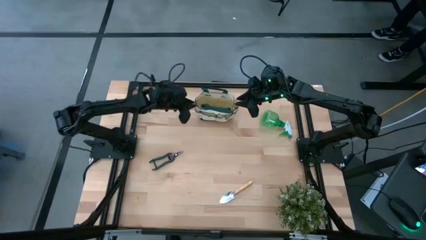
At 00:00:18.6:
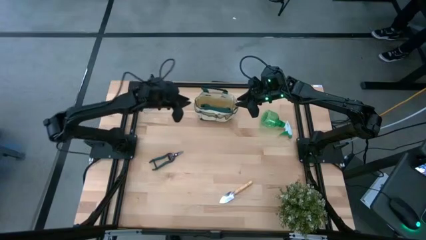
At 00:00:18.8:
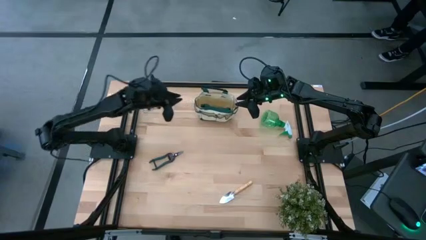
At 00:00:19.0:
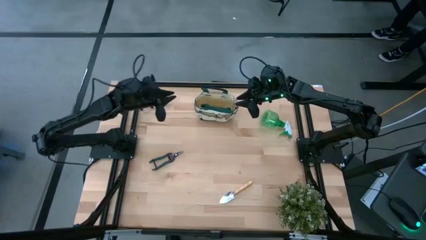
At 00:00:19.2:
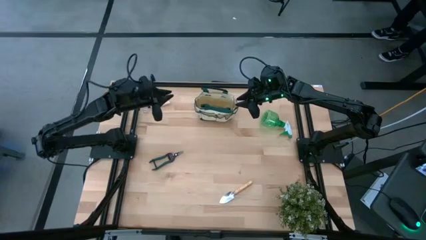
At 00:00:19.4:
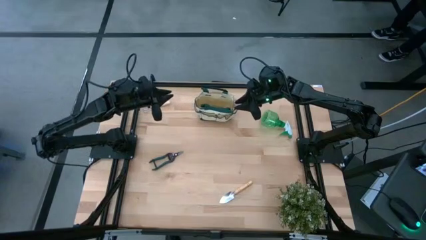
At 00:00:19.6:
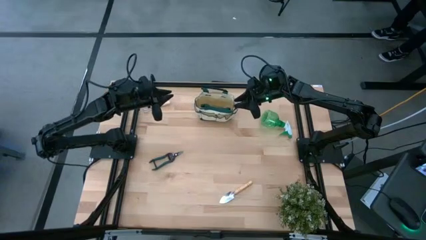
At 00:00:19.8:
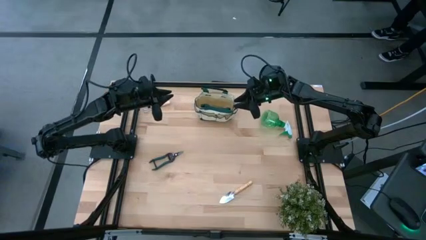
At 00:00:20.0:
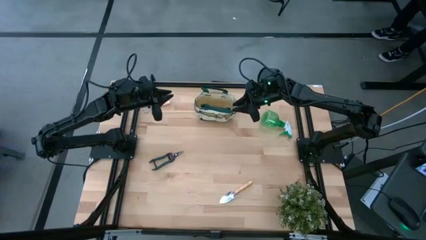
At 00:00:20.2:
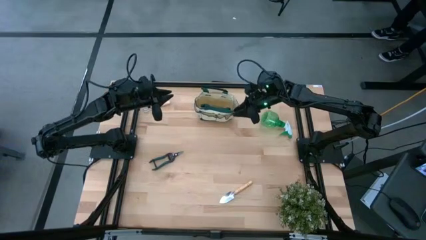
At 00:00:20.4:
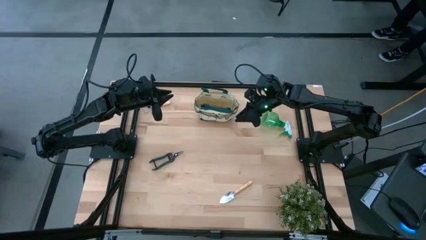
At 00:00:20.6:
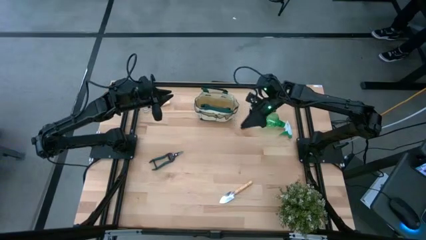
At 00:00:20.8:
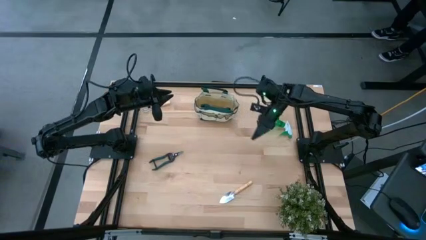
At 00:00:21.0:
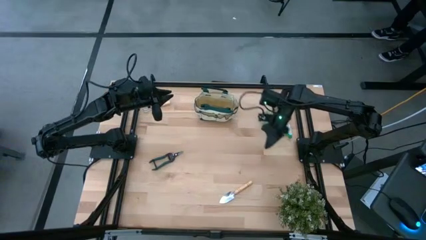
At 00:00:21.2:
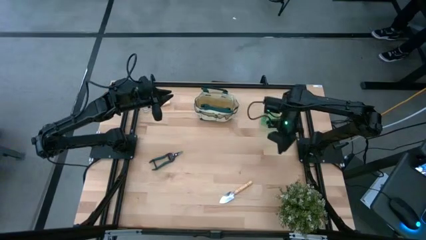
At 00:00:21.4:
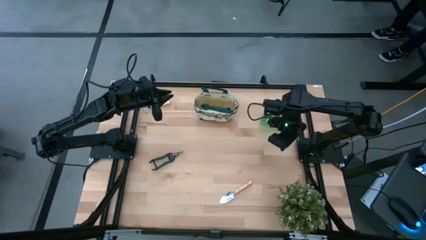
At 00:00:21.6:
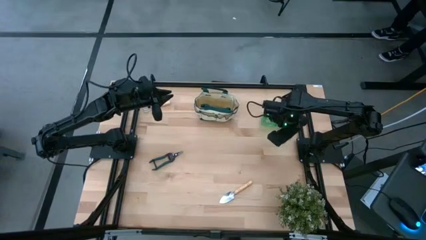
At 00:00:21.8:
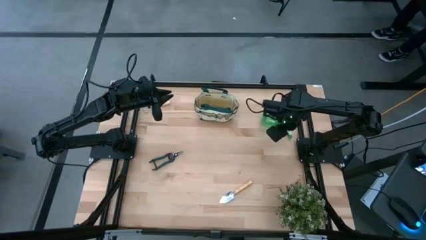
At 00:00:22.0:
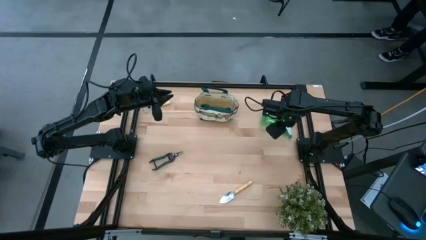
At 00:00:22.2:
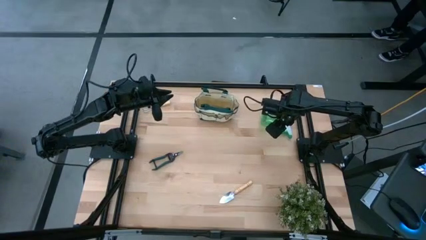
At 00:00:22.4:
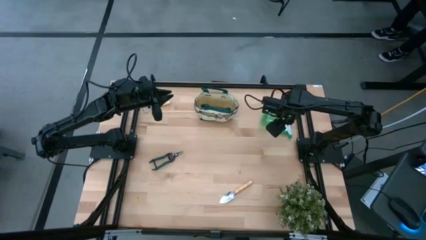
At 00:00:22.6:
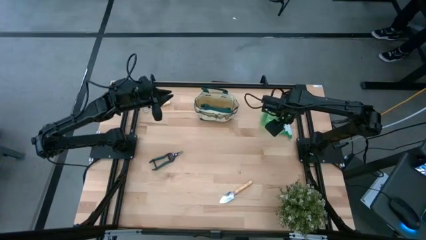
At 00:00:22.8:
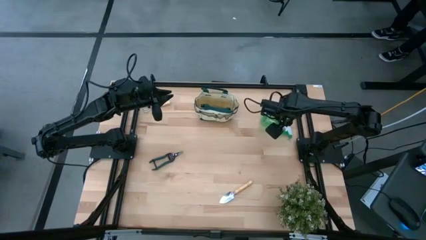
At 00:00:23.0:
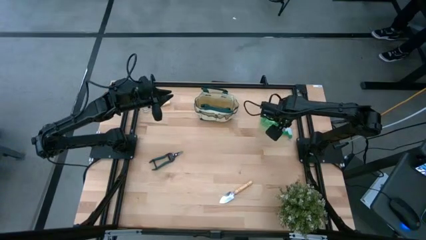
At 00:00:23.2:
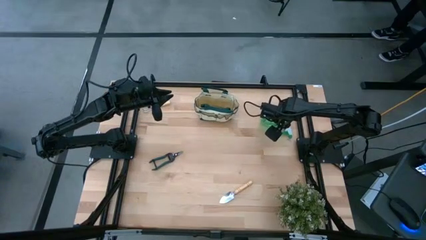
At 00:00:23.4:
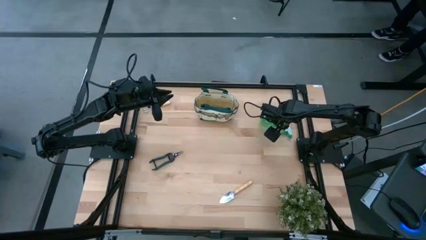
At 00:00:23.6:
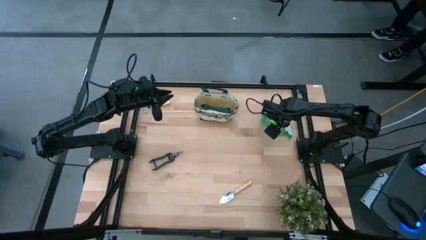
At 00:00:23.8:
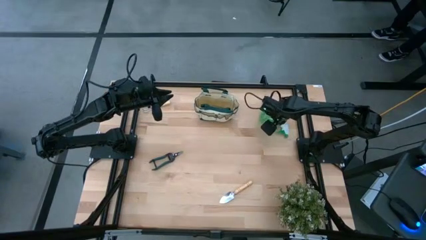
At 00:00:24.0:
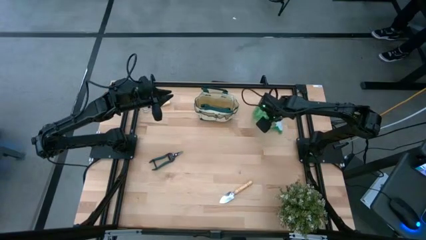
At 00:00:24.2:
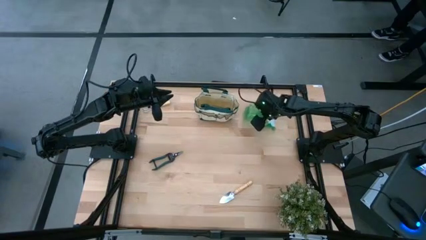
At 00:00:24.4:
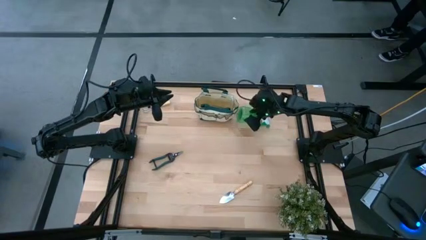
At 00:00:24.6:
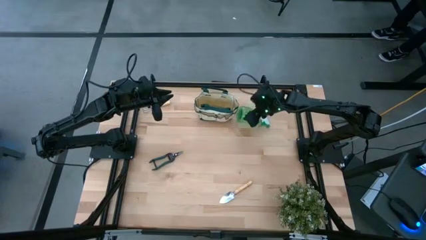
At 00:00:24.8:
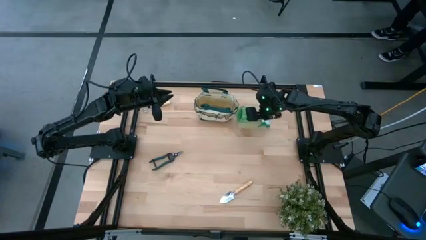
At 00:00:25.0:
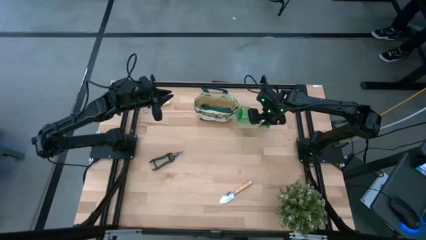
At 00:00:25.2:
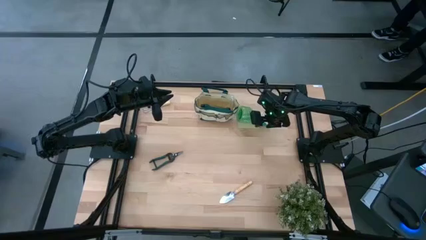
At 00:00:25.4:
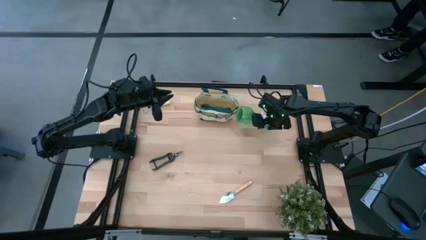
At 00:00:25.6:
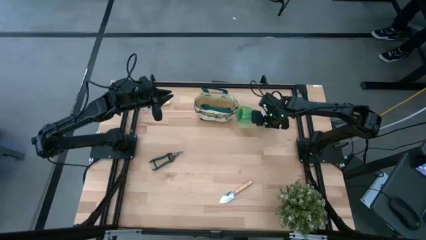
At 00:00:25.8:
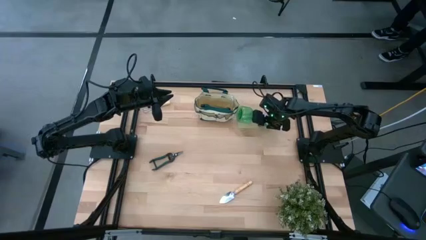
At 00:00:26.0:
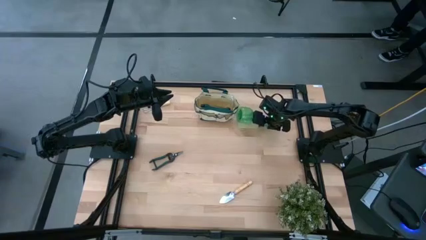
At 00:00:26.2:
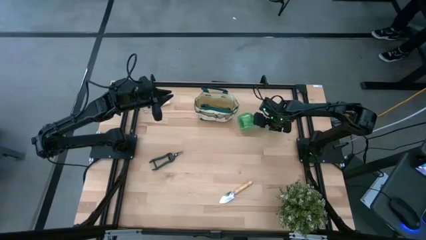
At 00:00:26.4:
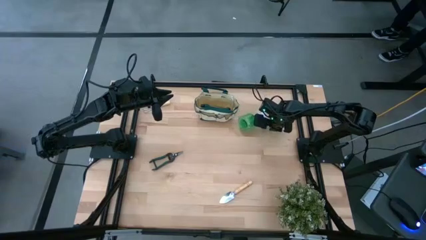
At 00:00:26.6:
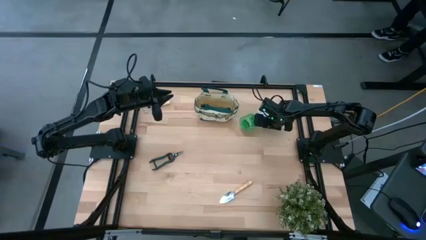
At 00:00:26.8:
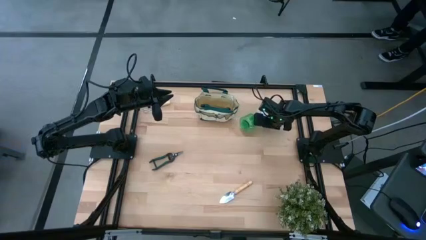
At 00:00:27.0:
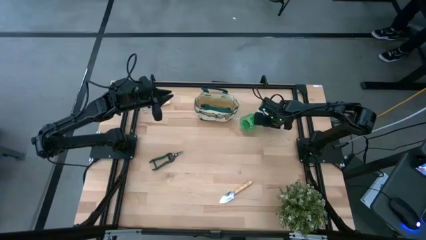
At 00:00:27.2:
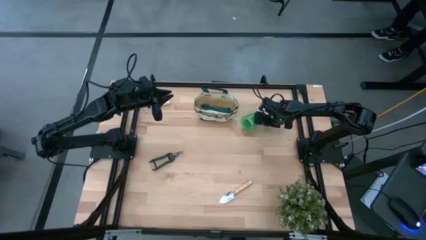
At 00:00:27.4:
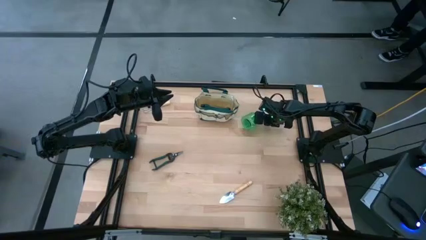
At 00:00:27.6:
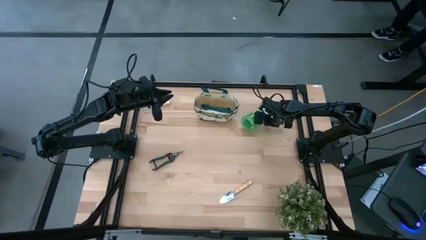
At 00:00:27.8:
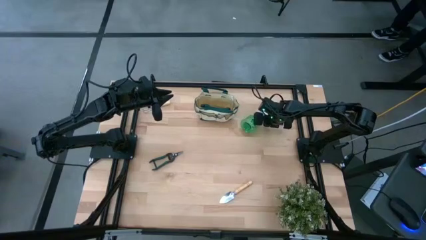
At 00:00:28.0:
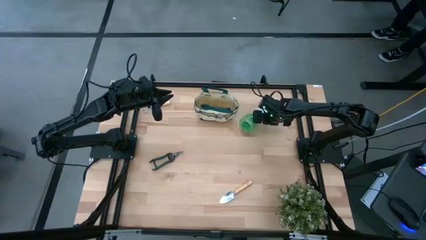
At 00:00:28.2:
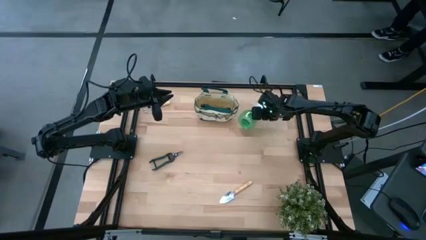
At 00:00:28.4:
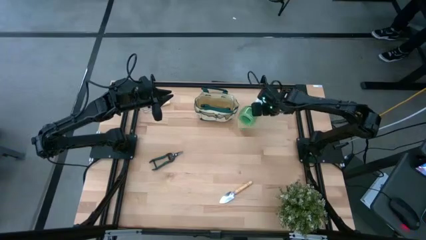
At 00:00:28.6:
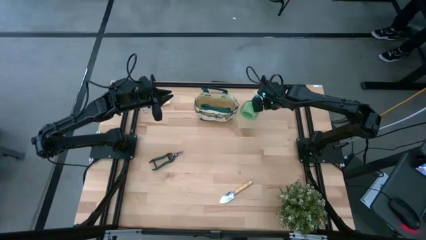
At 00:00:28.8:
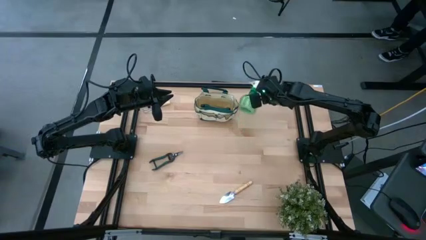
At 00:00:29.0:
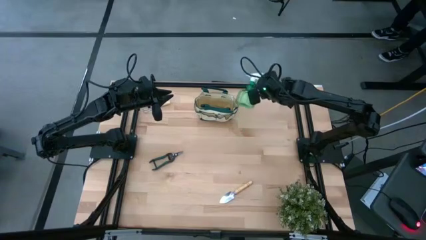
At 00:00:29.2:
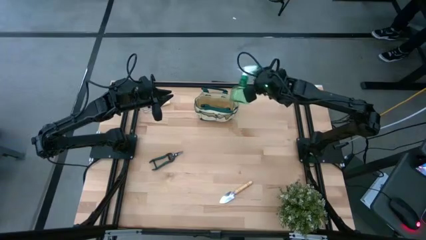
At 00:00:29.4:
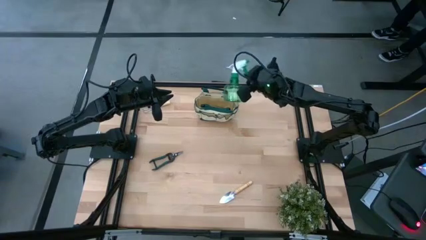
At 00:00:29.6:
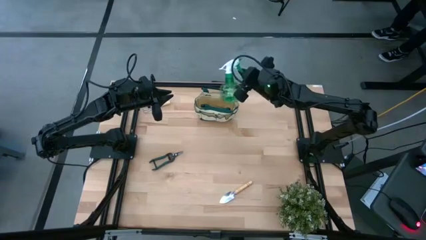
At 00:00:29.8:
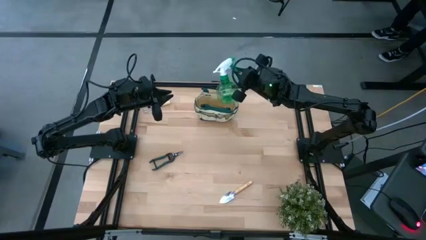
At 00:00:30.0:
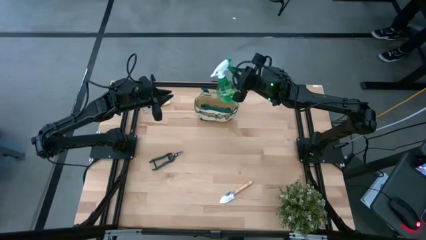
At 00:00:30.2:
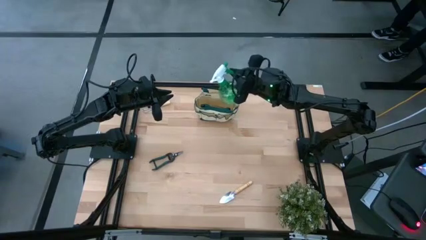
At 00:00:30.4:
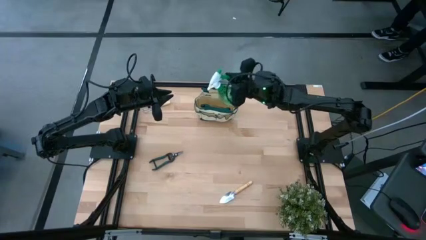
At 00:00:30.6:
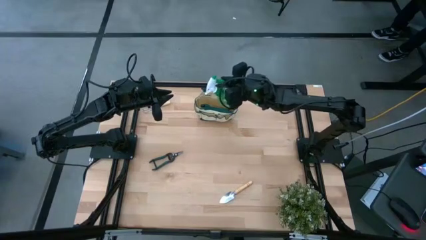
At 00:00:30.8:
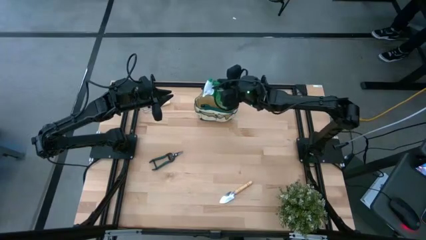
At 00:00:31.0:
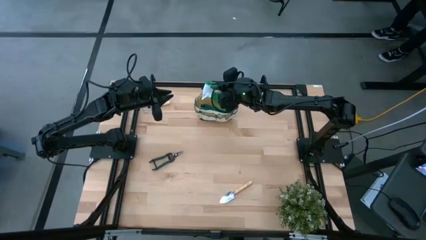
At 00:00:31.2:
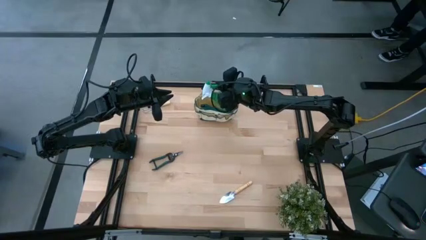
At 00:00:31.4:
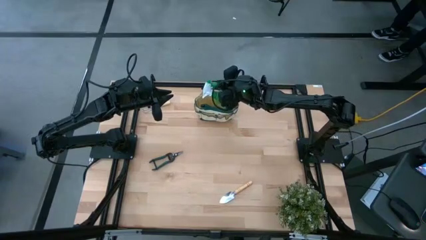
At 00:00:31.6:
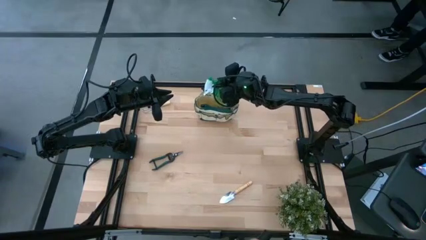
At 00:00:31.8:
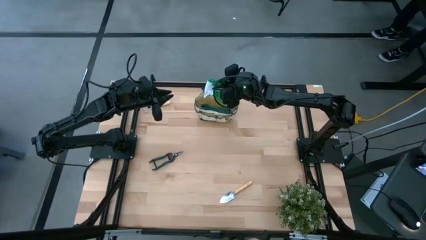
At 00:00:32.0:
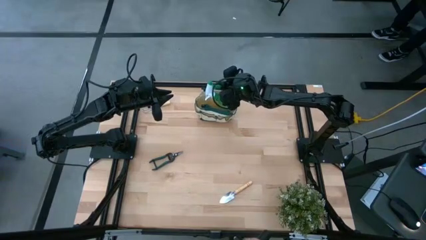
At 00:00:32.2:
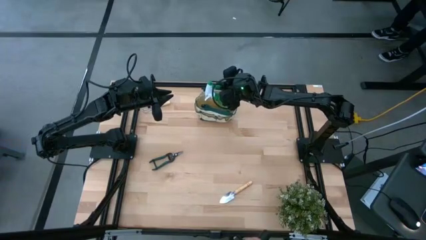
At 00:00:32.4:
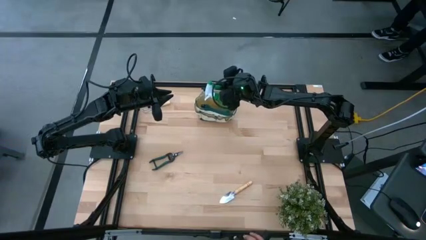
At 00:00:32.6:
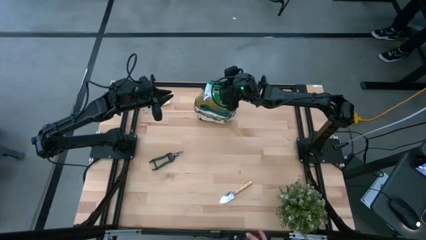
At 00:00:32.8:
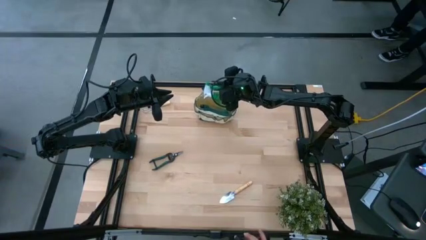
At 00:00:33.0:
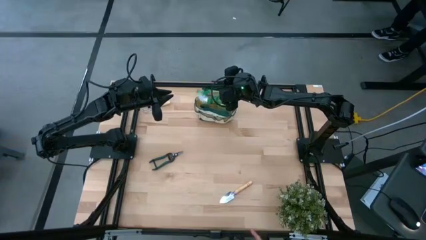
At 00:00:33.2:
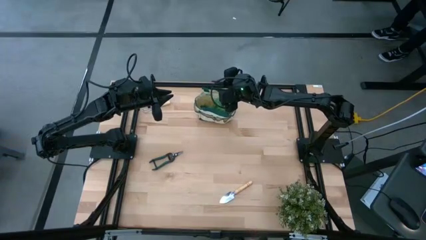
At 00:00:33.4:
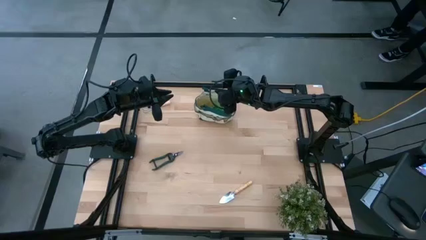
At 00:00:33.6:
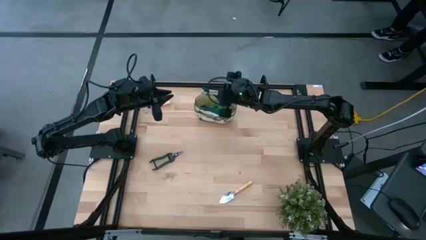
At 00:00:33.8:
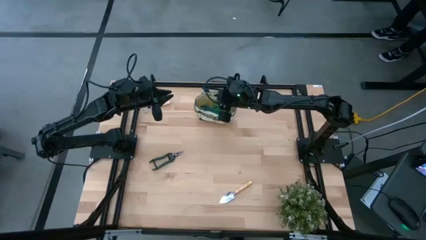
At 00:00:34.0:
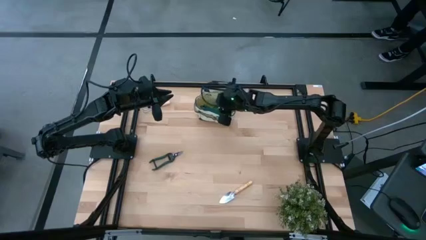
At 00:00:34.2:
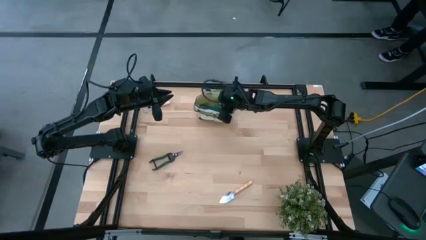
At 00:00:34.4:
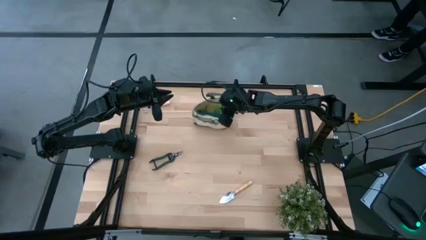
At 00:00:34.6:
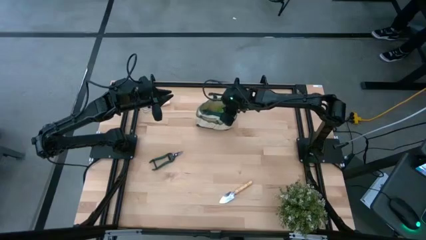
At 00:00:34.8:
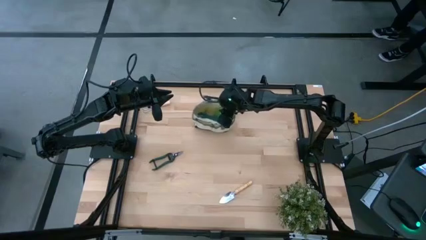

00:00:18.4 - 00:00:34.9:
Task: Pick & Place Garden tools in Gardening bag
Put the green spray bottle into the gardening bag
